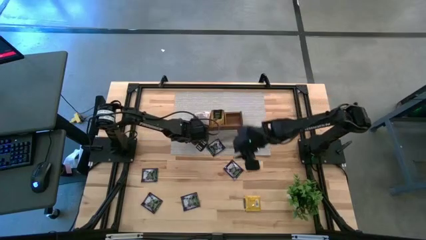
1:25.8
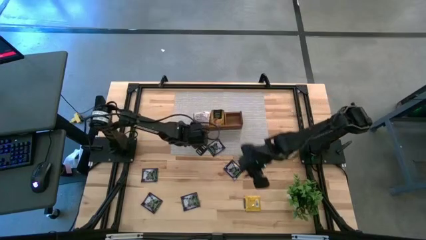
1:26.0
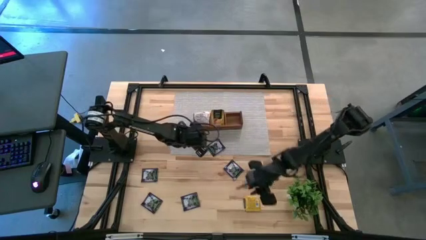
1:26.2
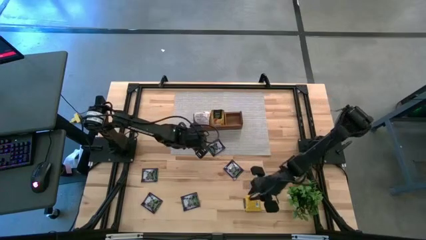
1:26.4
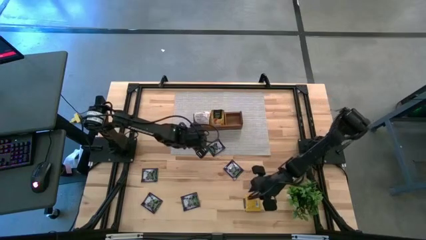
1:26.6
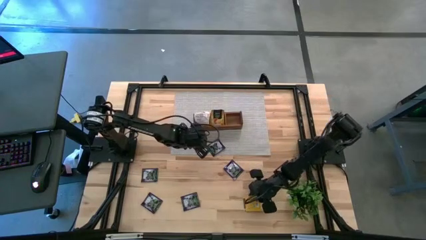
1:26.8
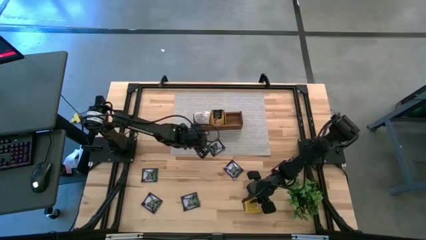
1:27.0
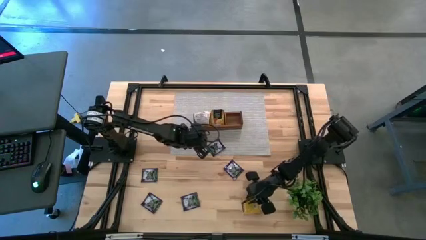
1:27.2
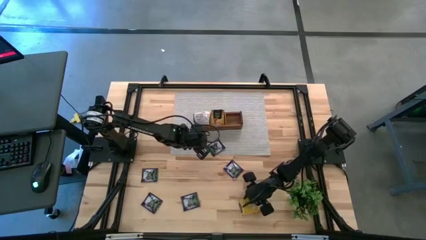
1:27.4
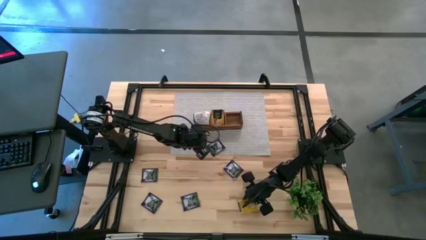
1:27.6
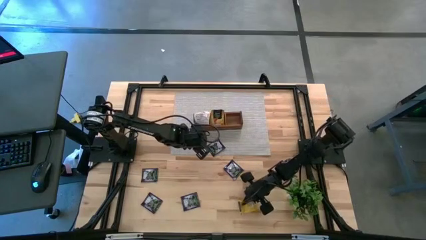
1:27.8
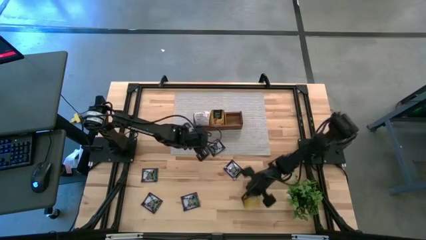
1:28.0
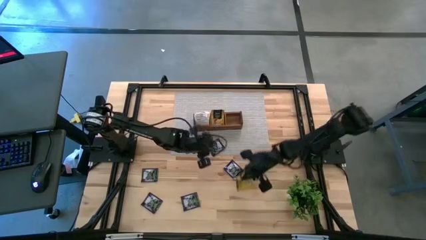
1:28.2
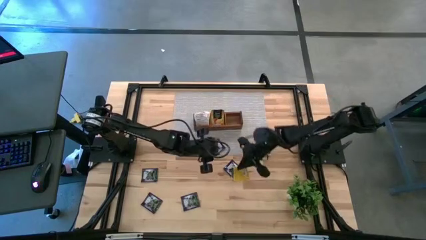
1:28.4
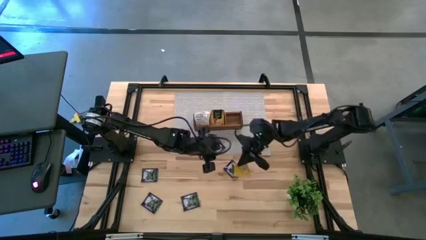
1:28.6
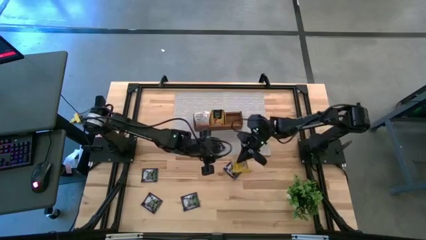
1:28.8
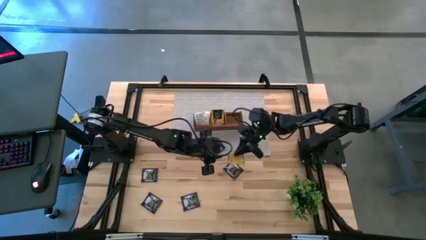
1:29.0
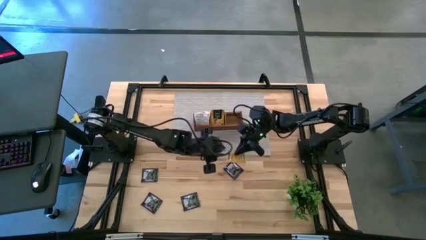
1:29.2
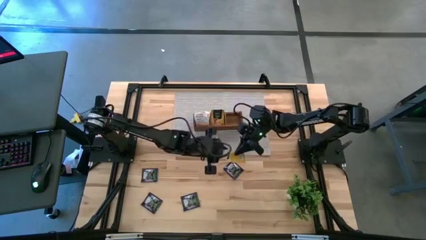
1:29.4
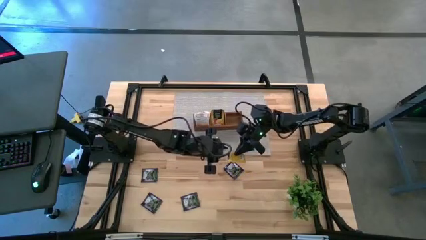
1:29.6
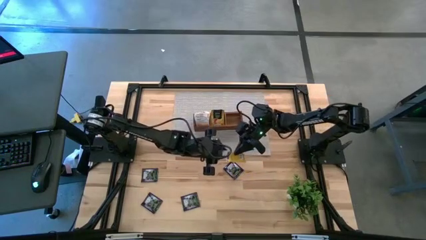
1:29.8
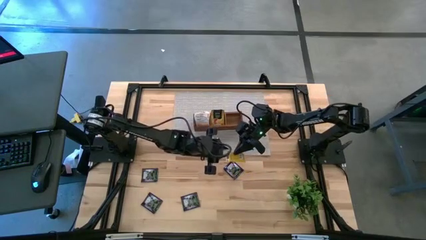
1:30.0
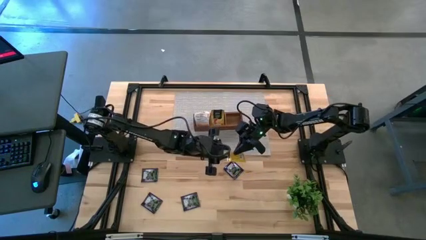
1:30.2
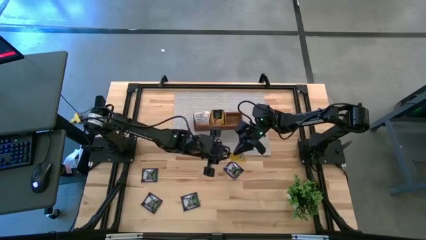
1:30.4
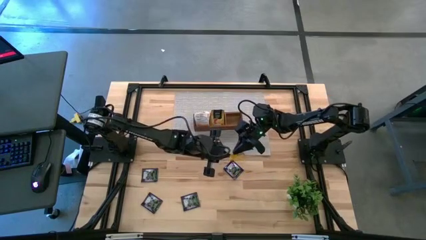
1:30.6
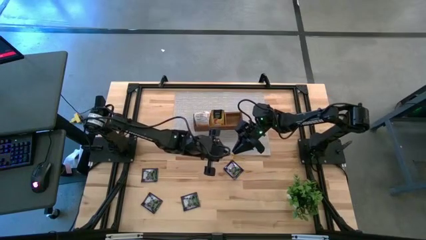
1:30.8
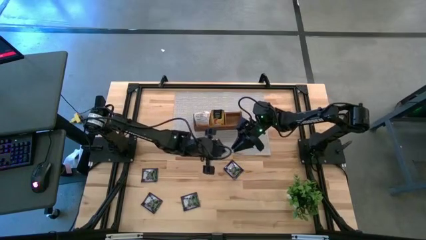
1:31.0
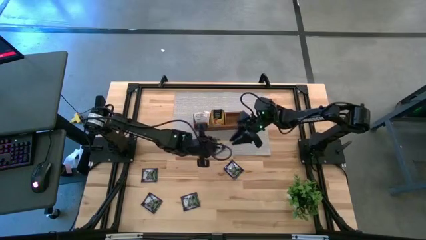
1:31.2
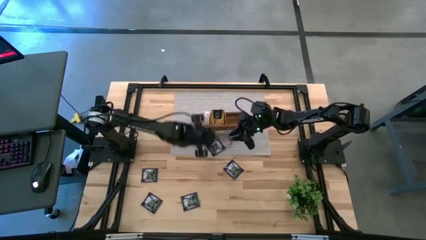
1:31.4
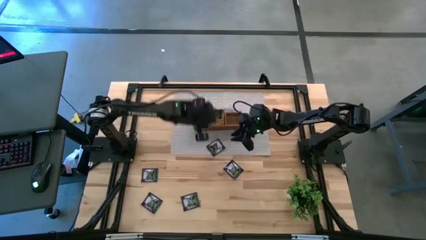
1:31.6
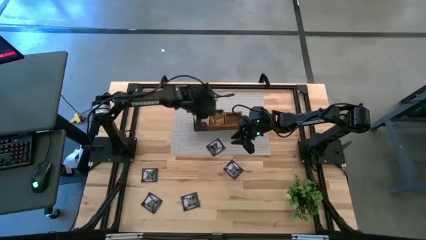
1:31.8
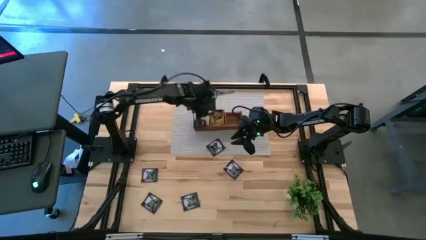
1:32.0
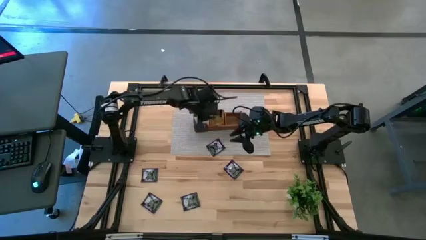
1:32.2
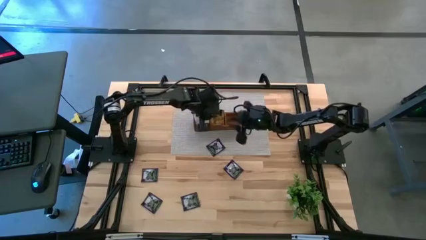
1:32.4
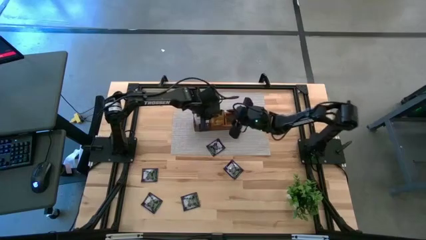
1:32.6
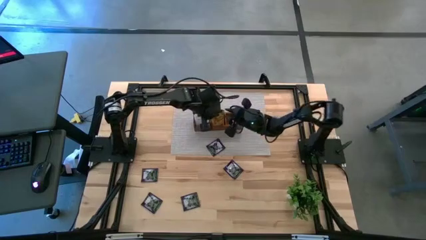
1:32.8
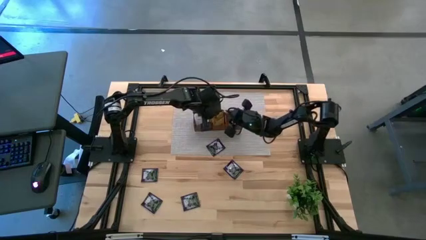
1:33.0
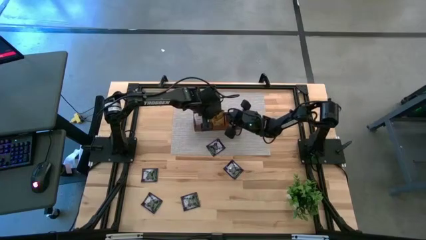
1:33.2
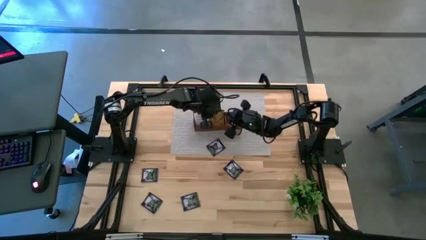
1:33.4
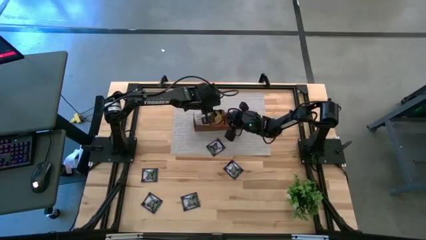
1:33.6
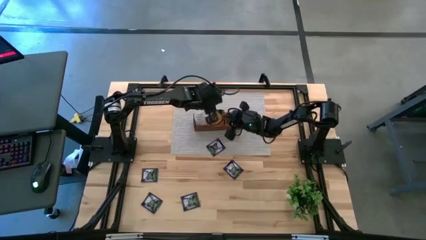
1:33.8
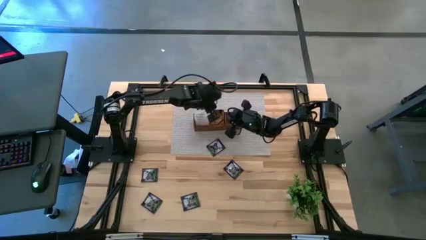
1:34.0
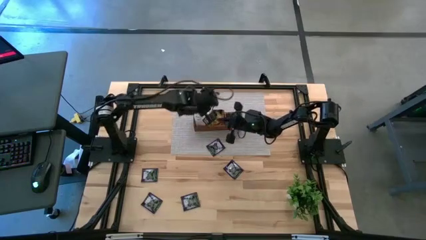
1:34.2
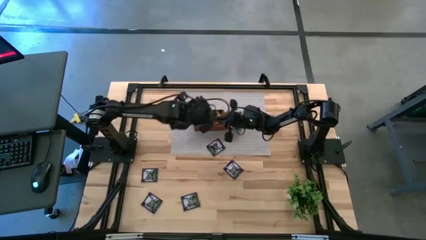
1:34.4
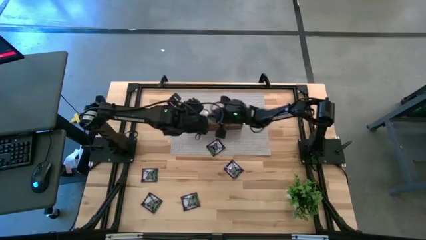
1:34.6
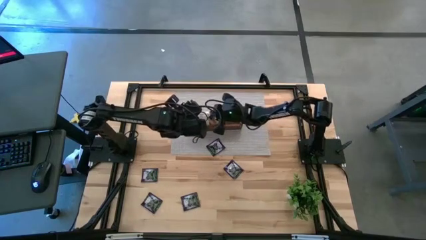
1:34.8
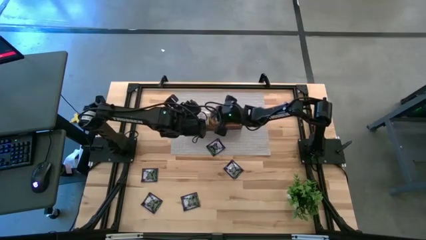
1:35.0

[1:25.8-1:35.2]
Task: Pick & Place Tea
Put the yellow tea bag into the middle section of the wooden organizer

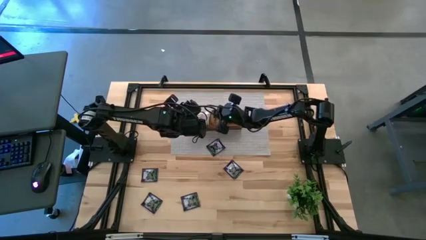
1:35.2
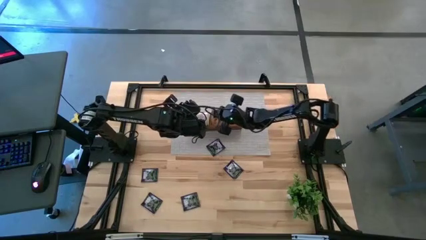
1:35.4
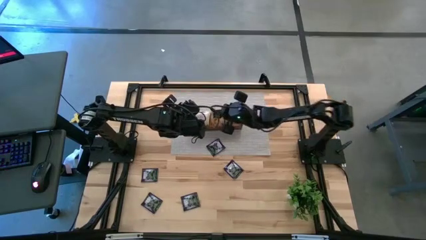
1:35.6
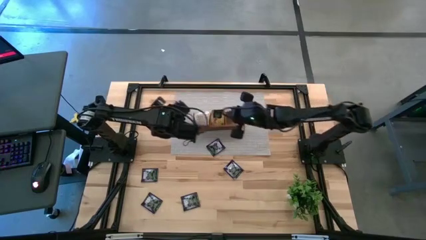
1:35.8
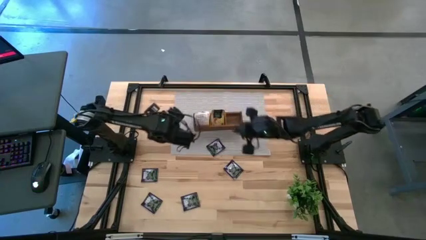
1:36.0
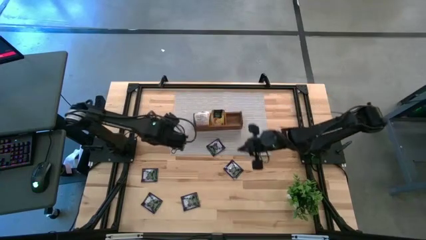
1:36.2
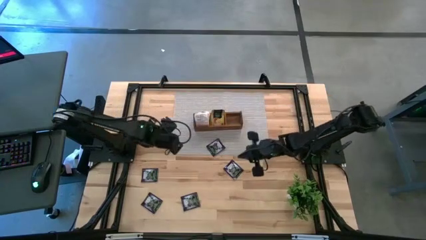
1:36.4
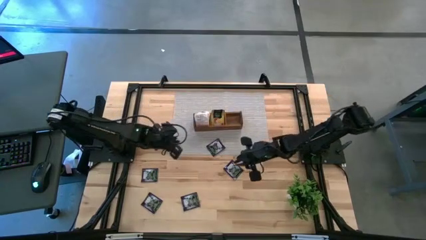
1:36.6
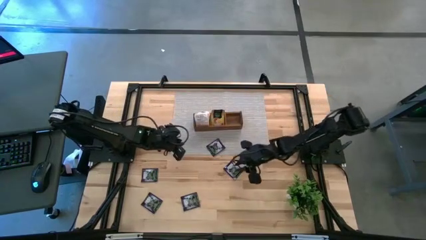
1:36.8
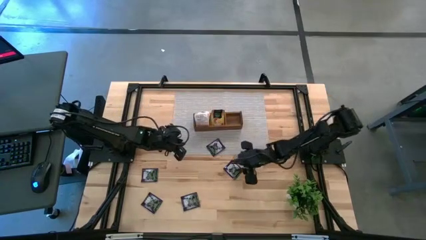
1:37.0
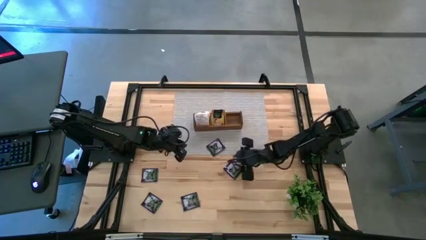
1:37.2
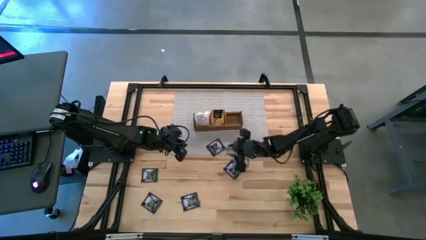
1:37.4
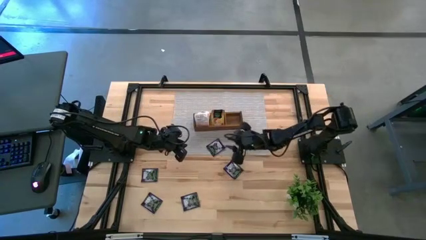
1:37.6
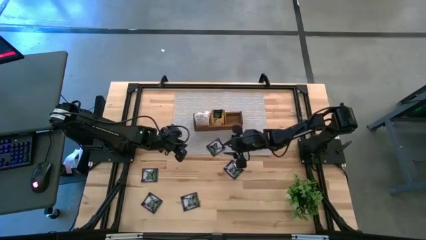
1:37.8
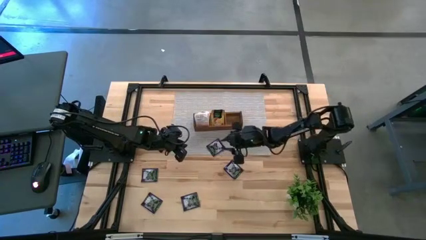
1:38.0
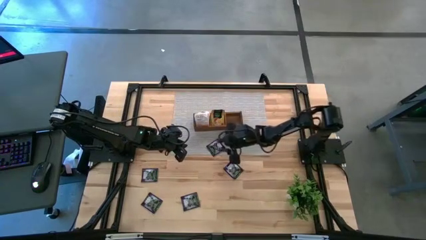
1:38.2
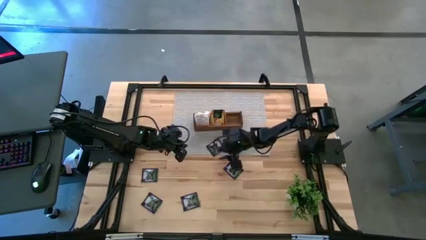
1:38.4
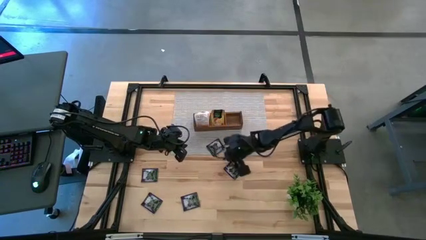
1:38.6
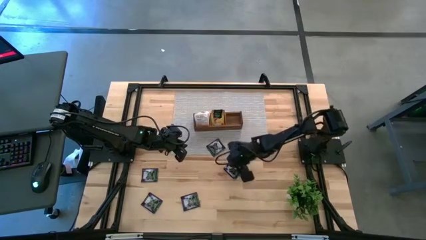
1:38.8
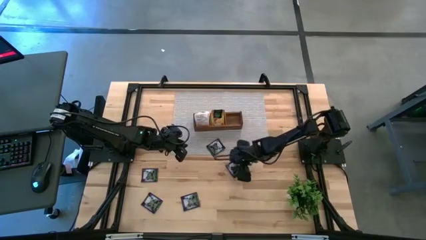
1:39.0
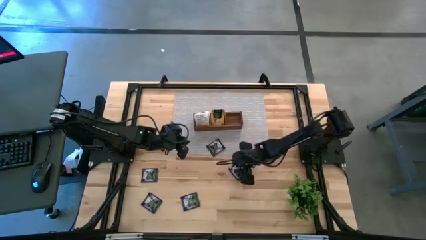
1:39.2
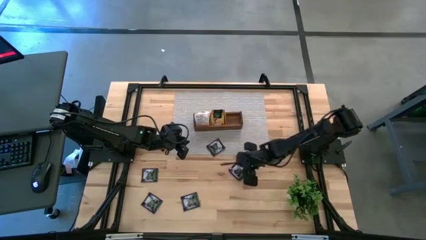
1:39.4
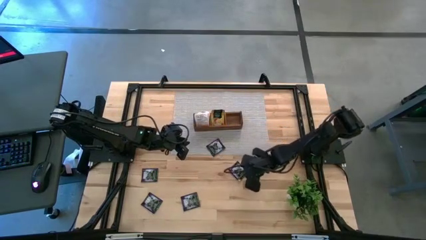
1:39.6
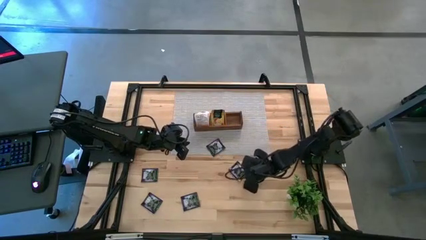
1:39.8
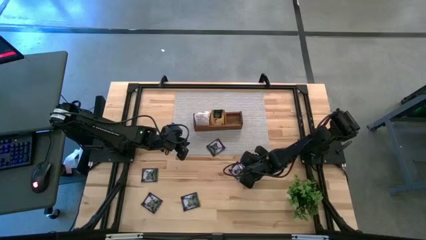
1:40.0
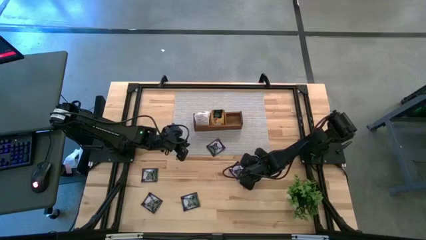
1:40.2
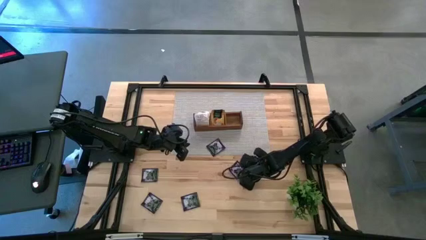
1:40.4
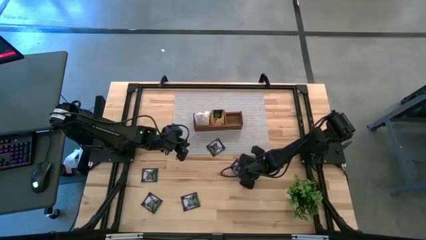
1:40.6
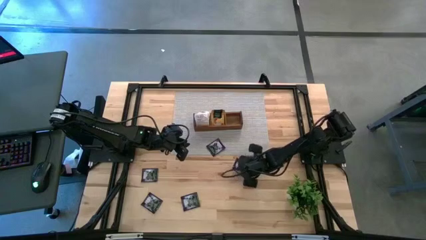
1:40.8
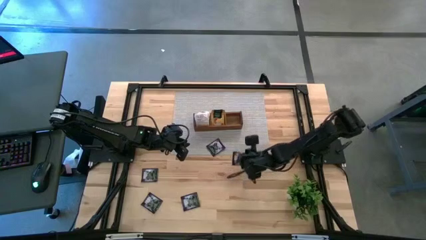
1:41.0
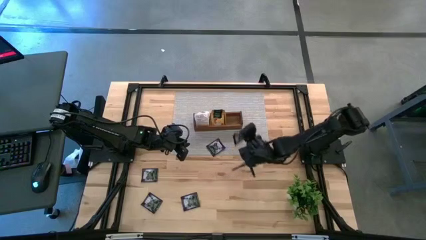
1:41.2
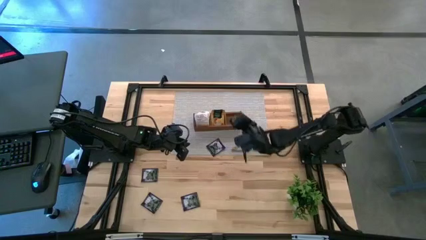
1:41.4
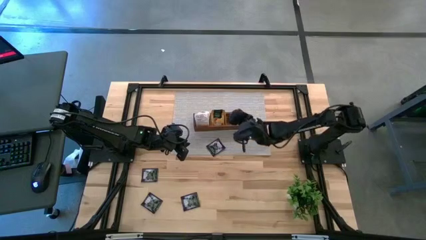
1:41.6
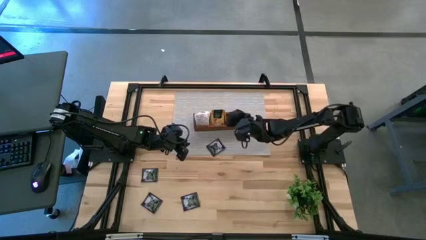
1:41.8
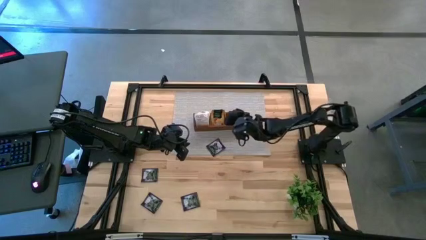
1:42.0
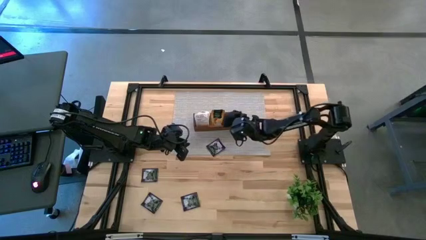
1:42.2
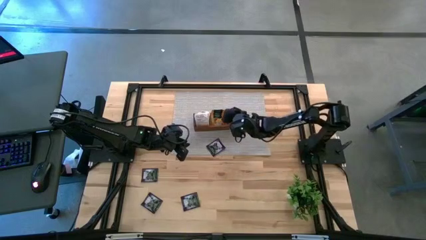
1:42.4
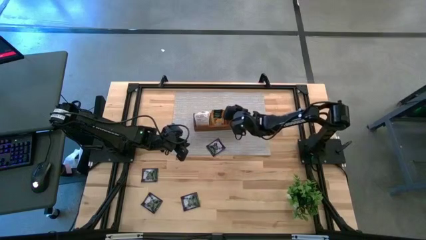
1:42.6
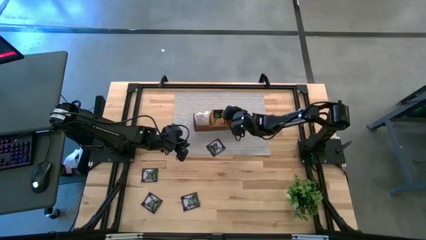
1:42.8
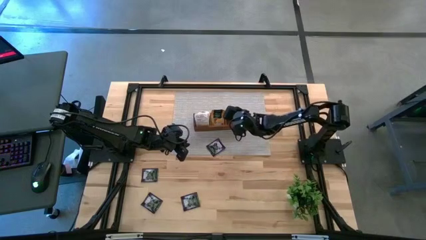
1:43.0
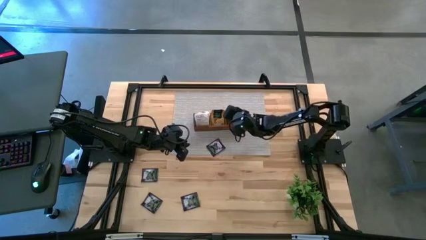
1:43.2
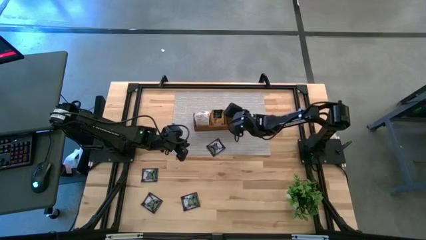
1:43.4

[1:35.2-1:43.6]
Put the violet tea bag into the right section of the wooden organizer
